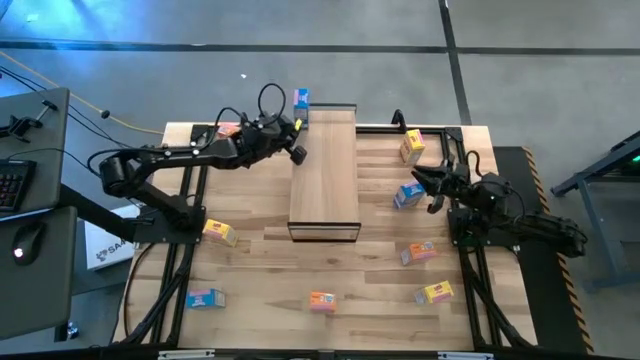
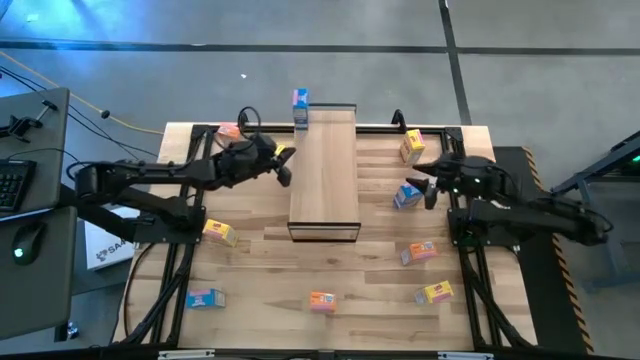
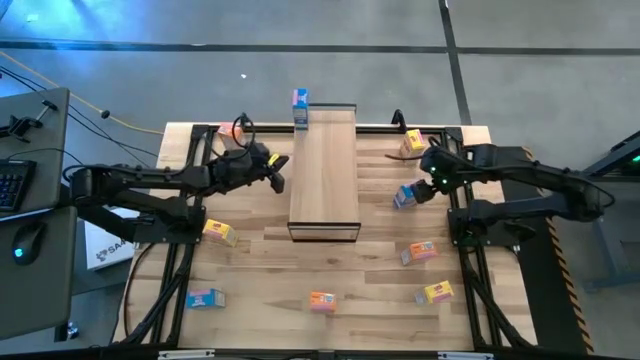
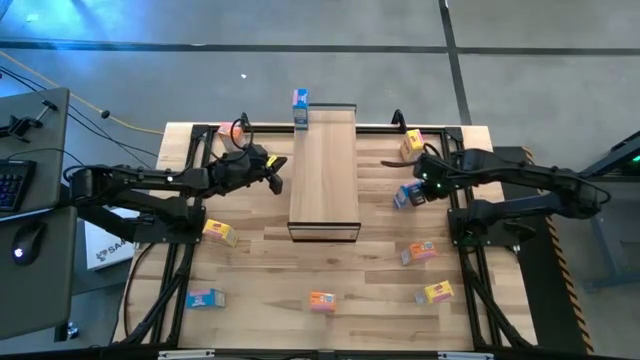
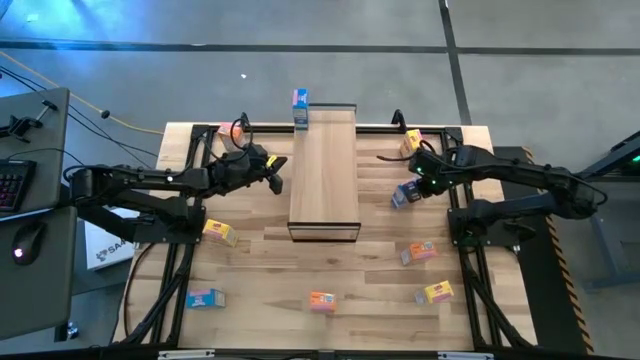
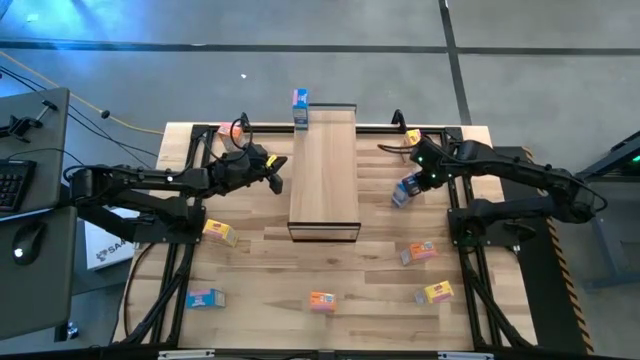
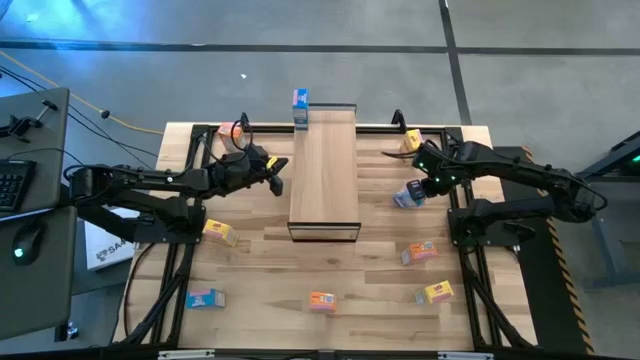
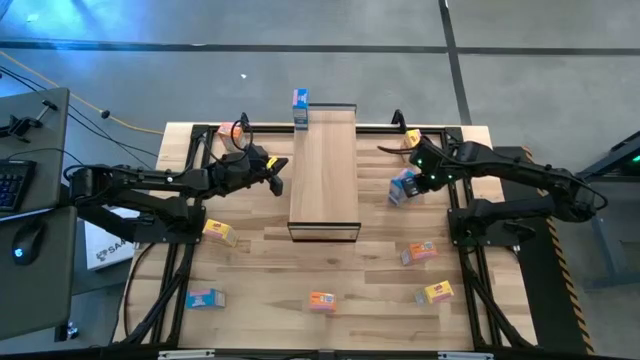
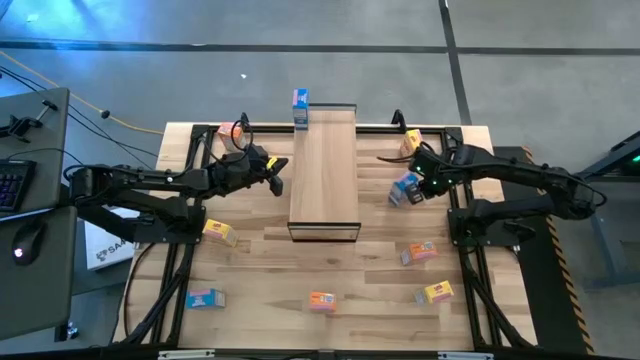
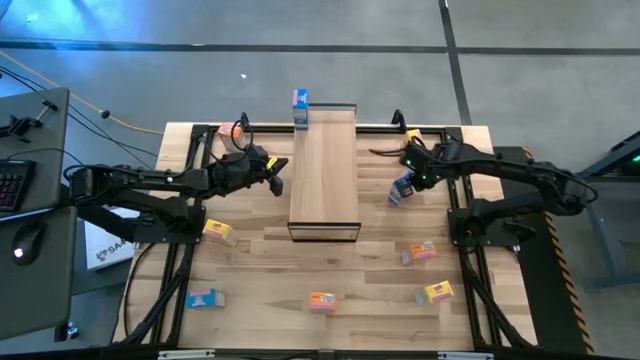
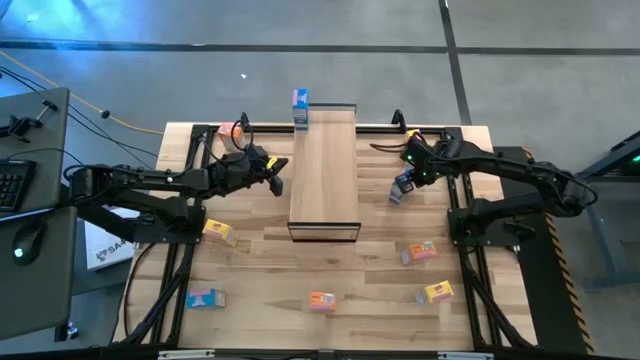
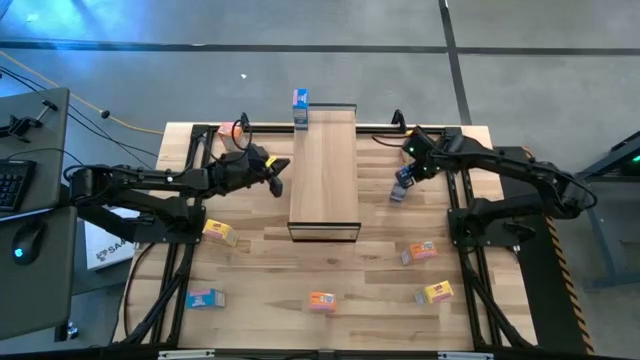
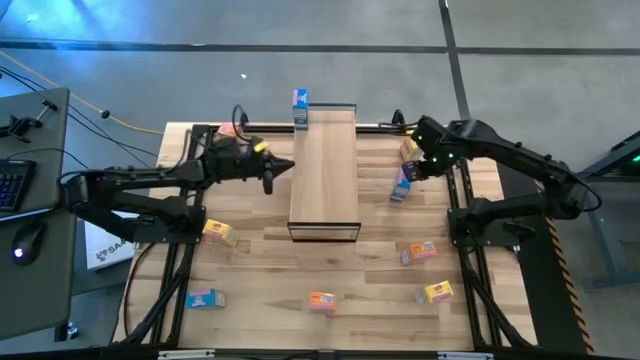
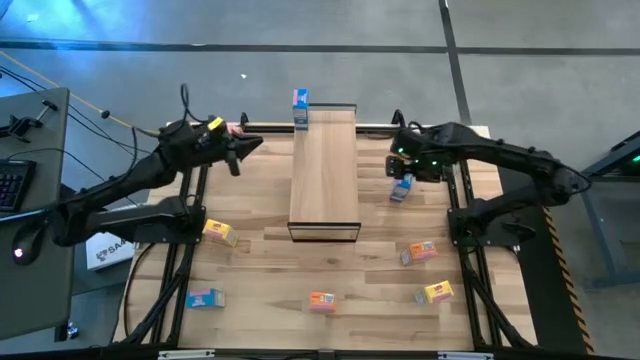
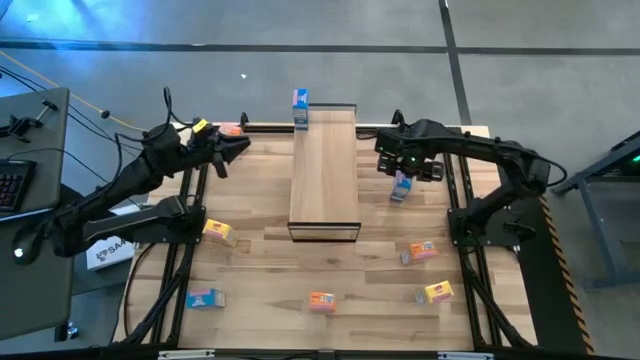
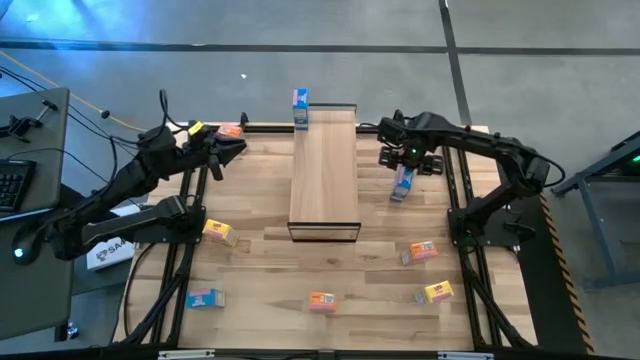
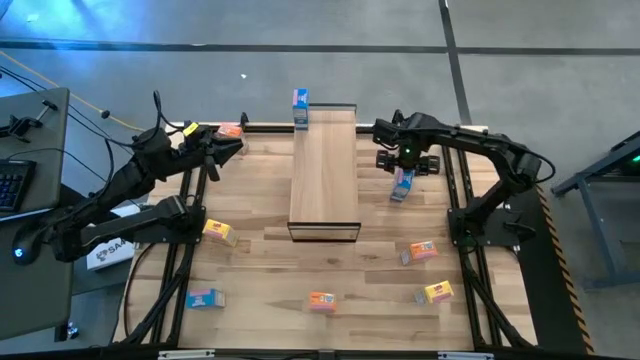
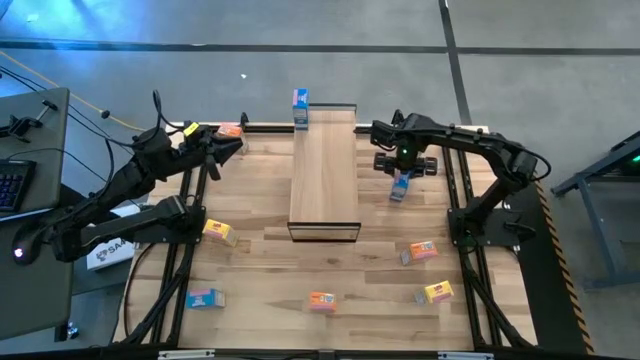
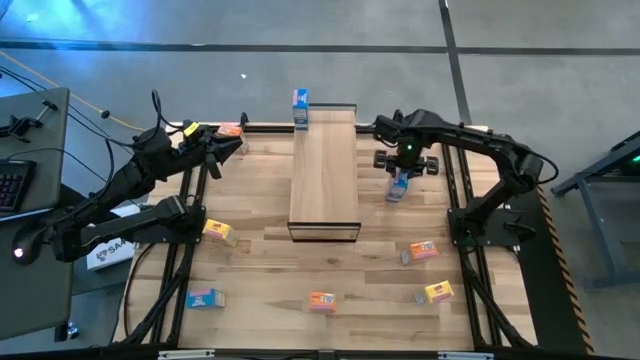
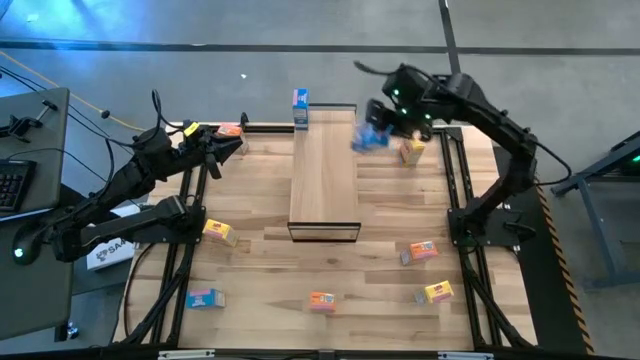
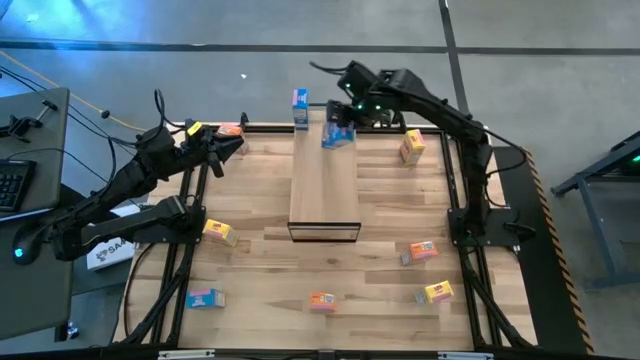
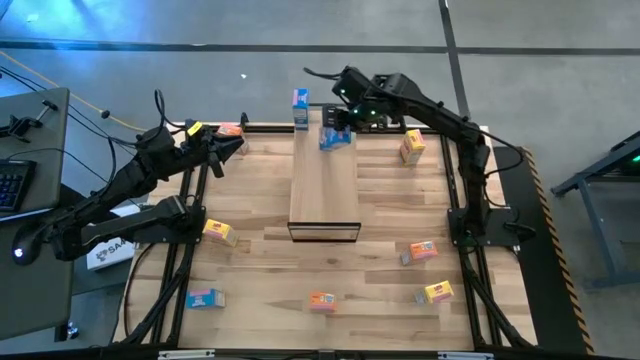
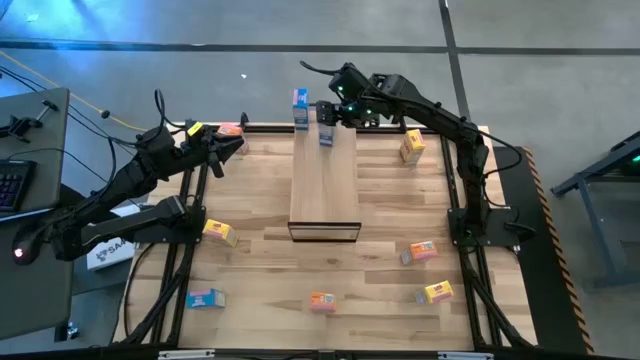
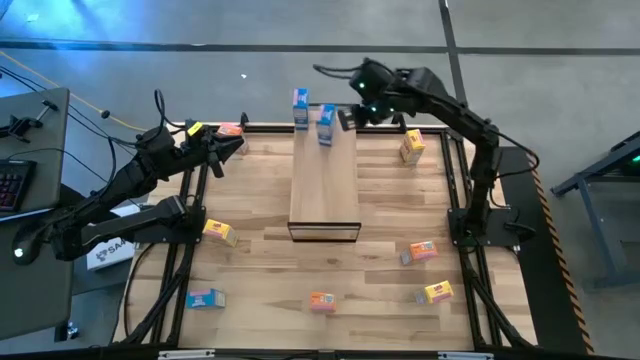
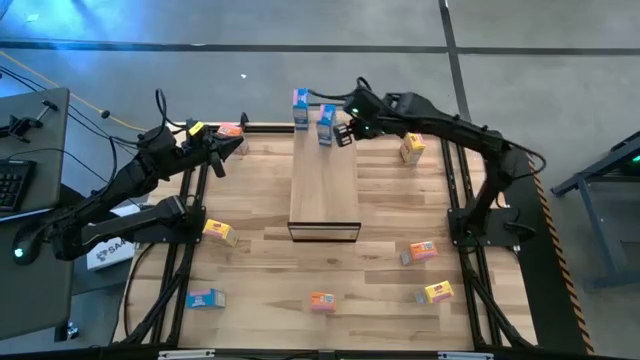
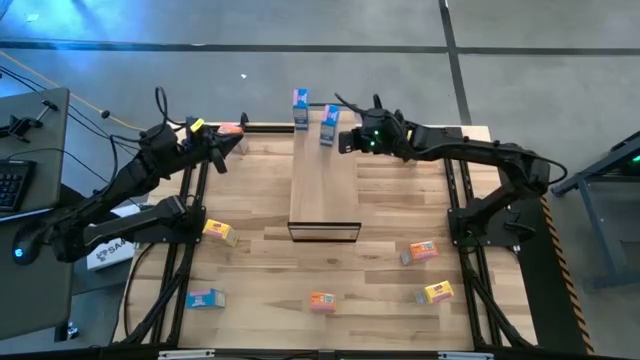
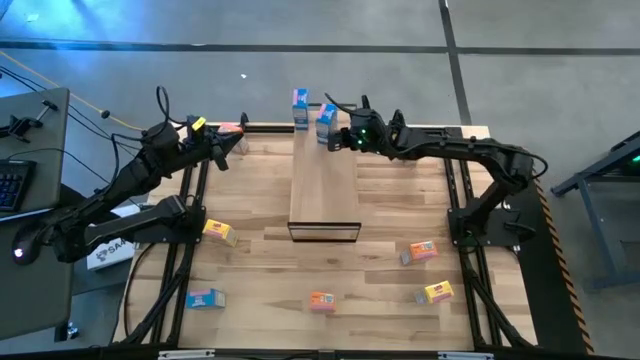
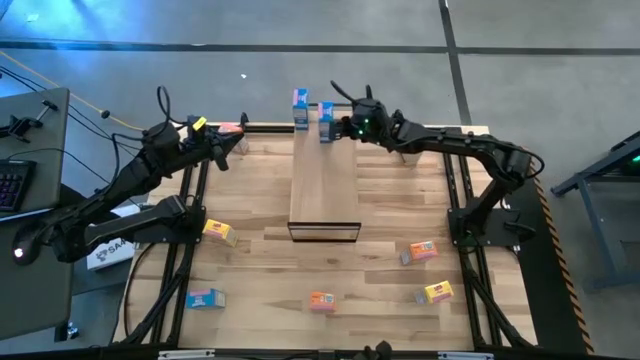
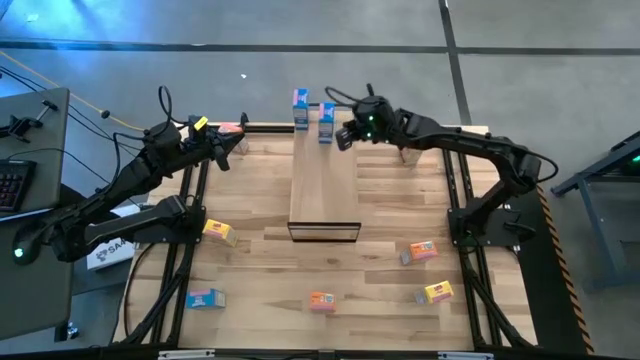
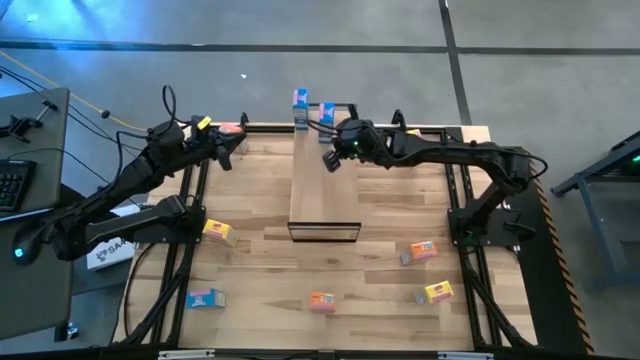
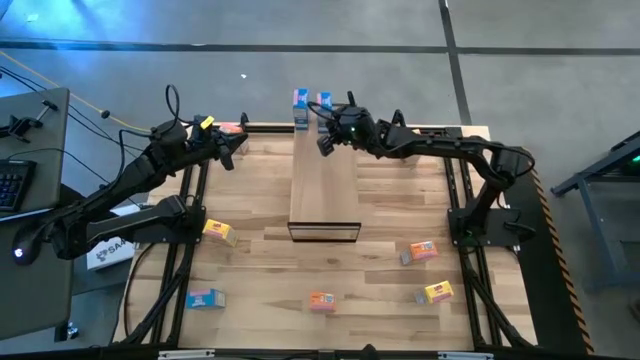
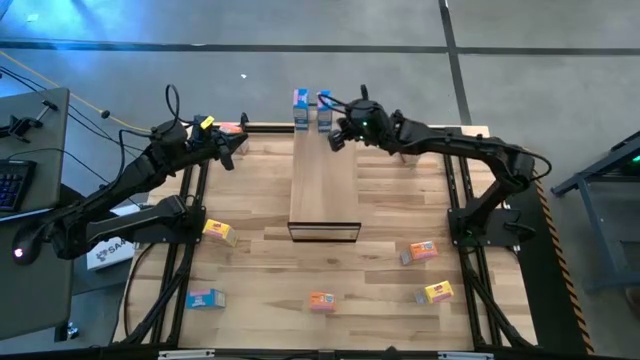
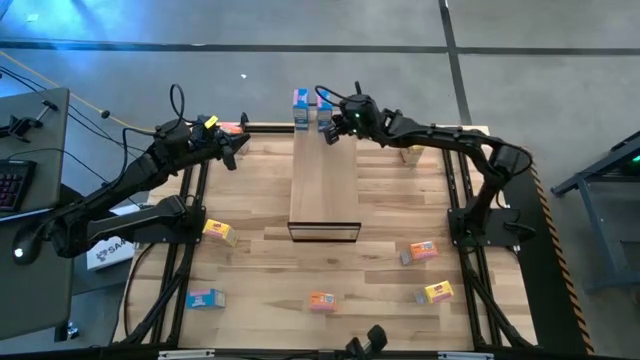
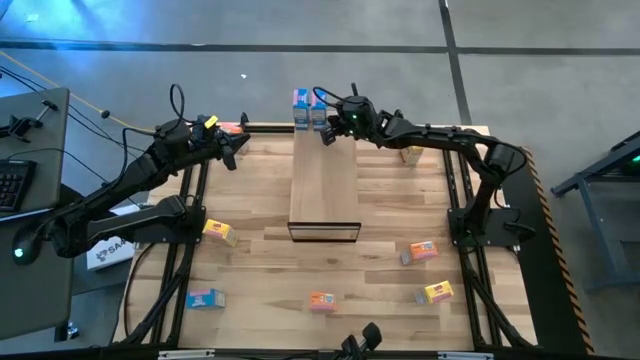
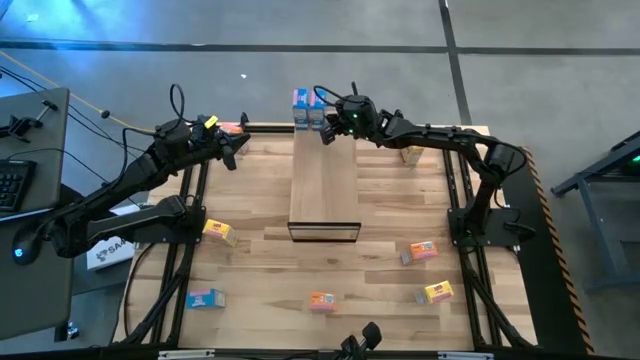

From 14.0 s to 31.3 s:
Task: Stack cereal on shelf
Put the right blue cereal box on the shelf aligned with the blue cereal box

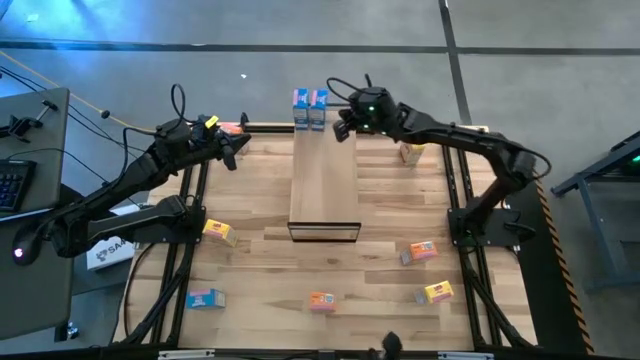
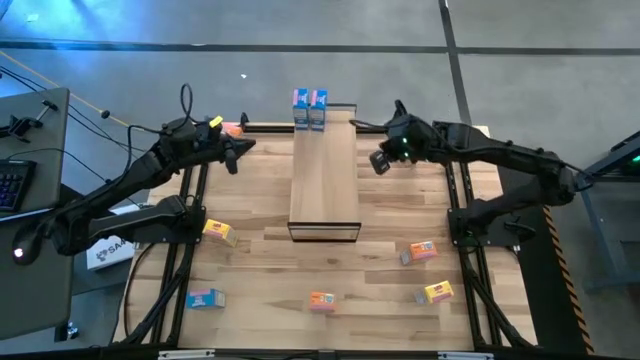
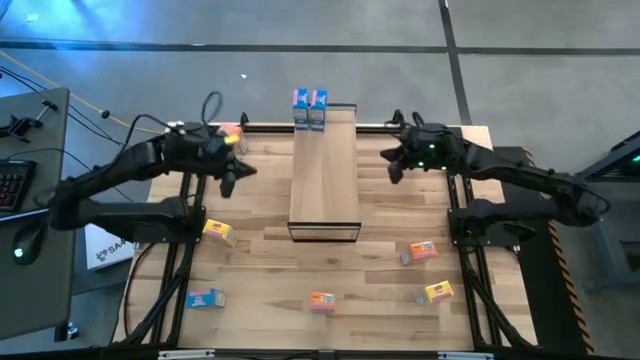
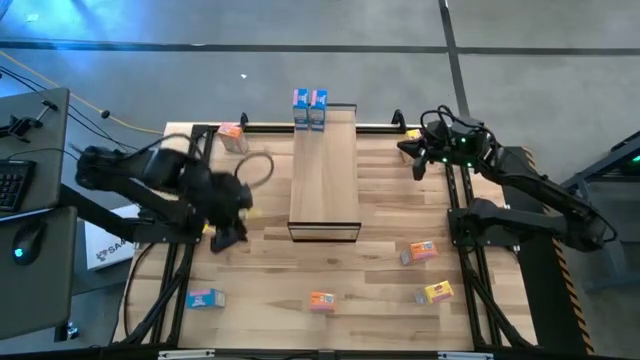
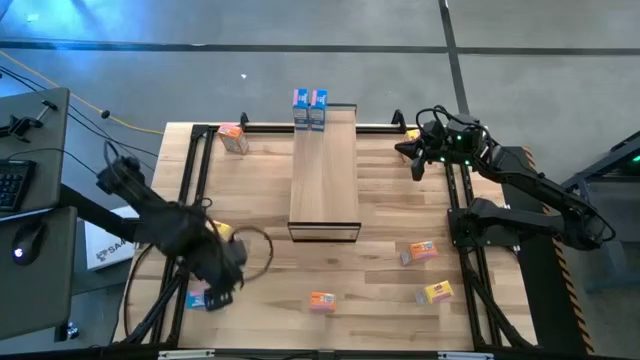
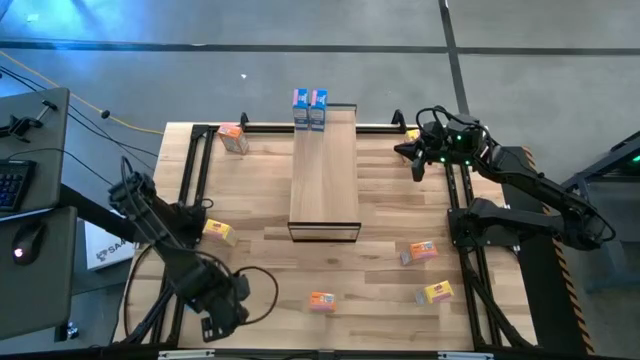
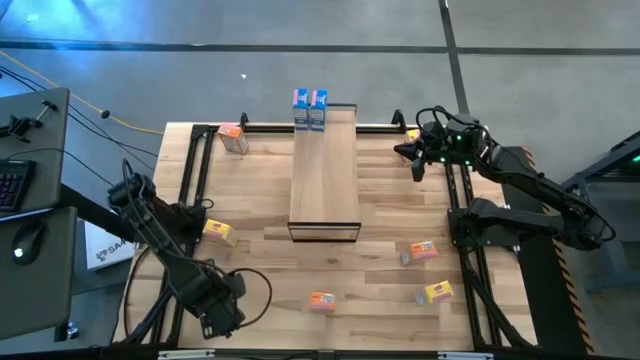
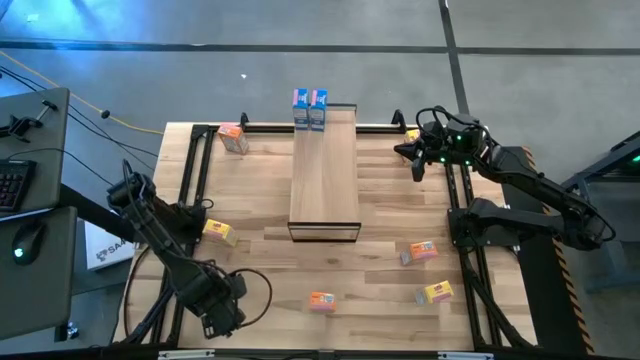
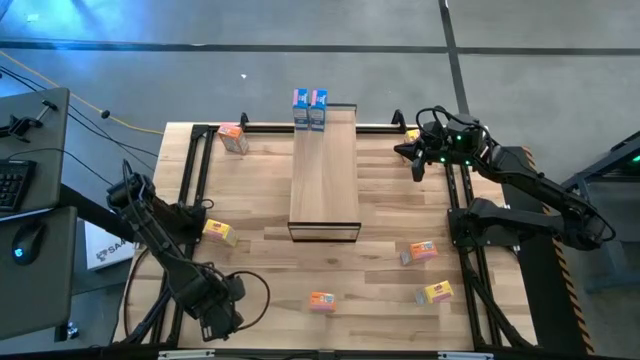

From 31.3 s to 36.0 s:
Put the blue cereal box on the shelf aligned with the blue cereal boxes
